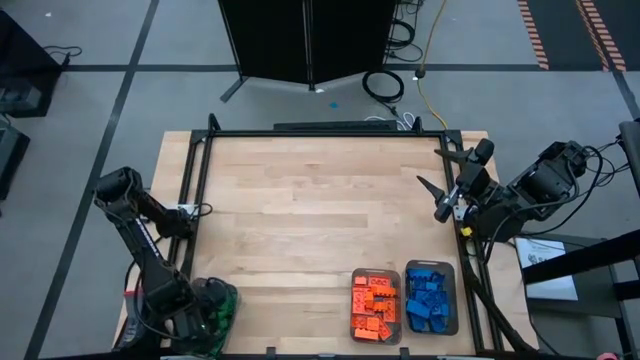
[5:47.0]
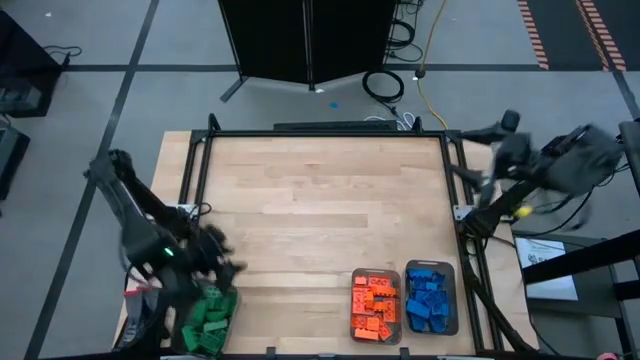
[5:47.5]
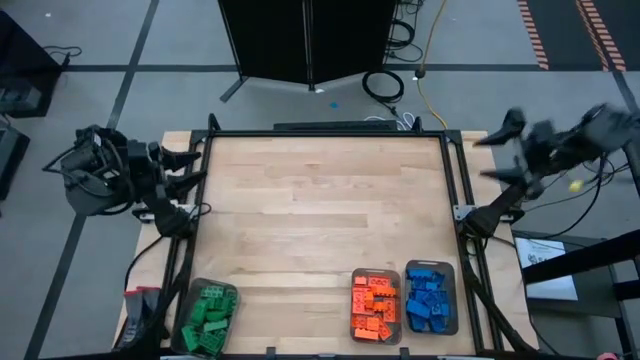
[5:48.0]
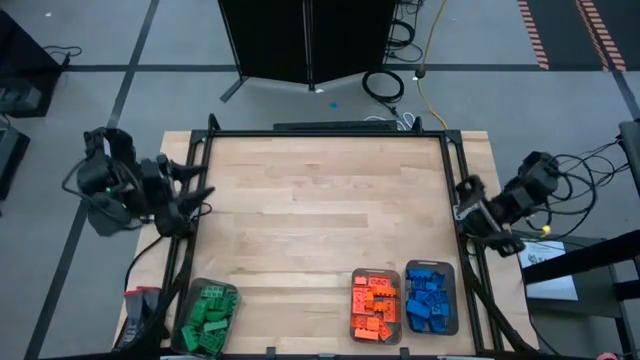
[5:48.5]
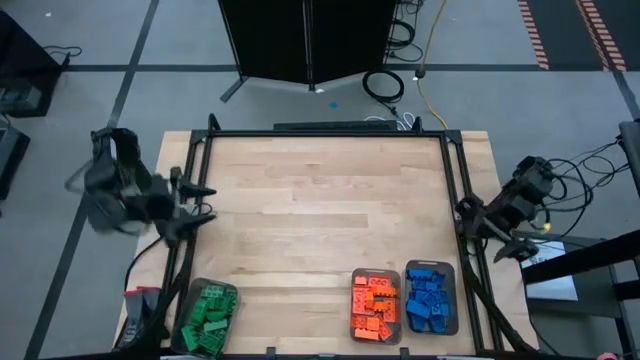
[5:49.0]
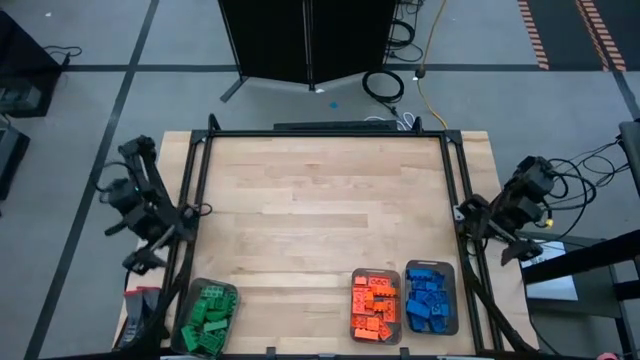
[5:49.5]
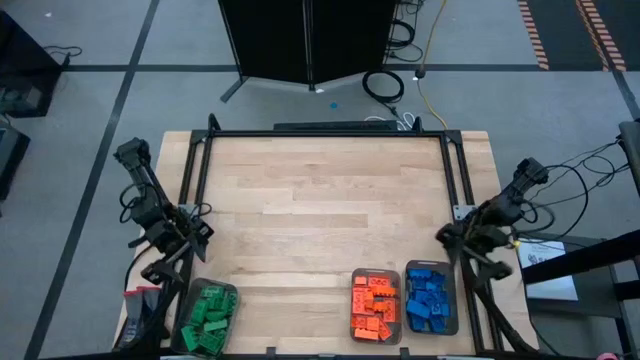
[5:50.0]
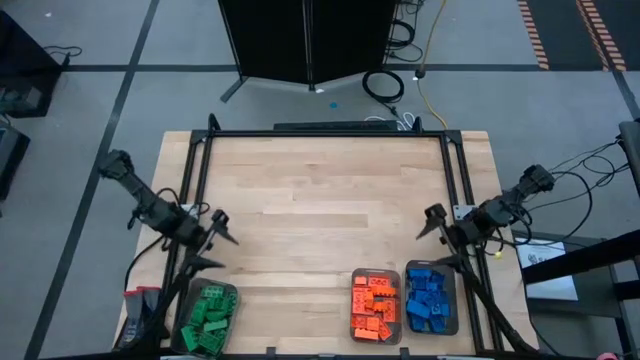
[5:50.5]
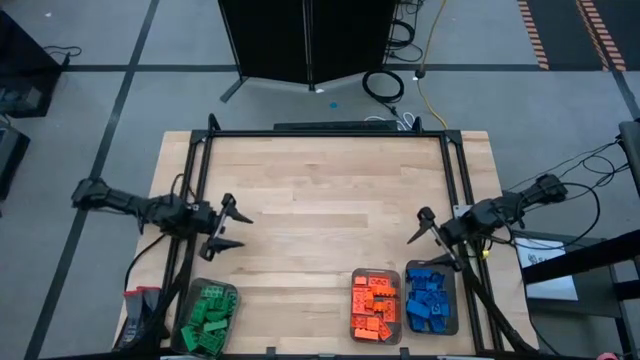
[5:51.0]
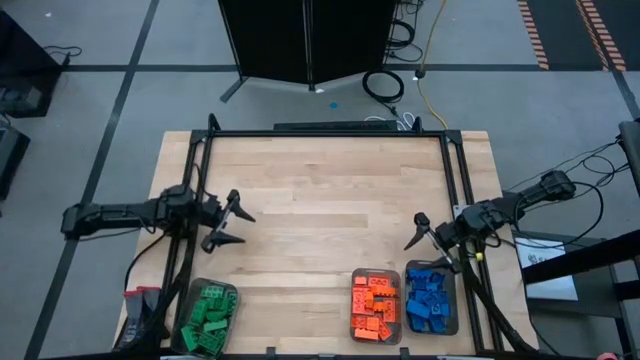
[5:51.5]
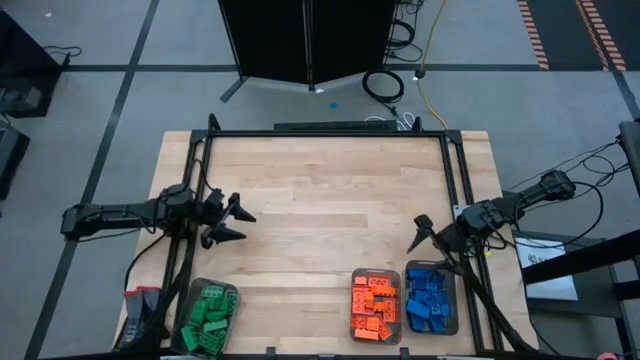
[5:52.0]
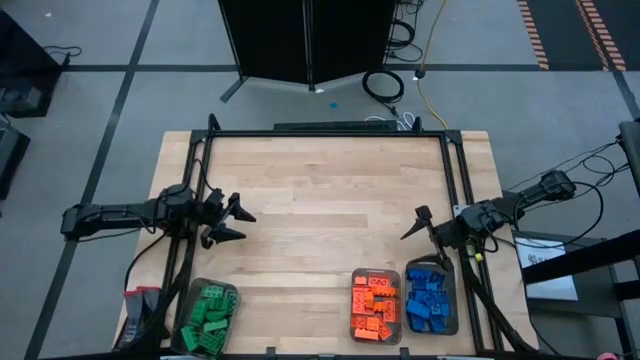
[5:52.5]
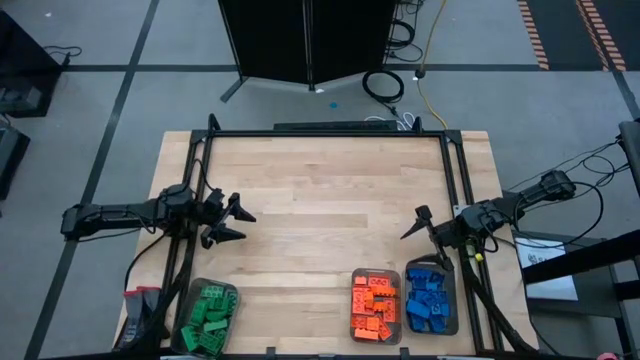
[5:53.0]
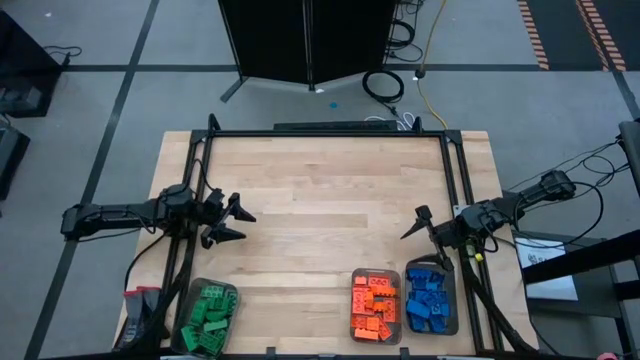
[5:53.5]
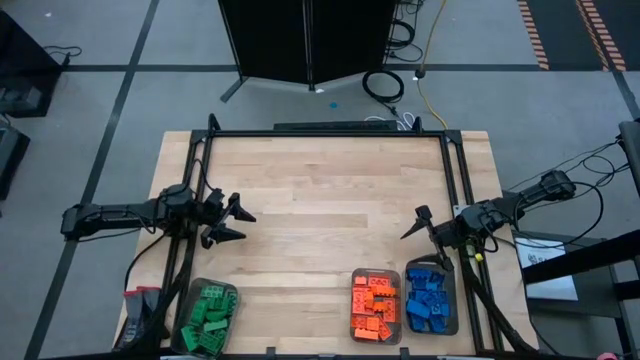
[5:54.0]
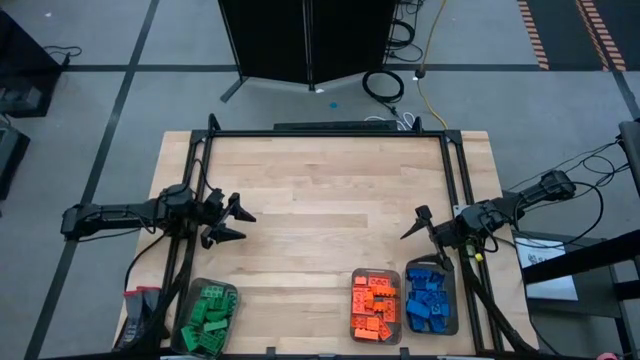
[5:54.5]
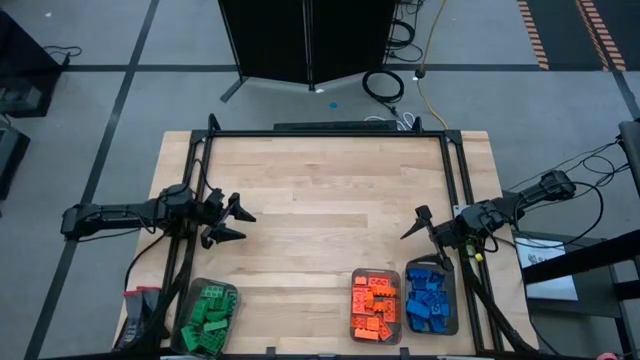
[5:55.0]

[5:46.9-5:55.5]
Task: Sort blocks
Return to Home Position

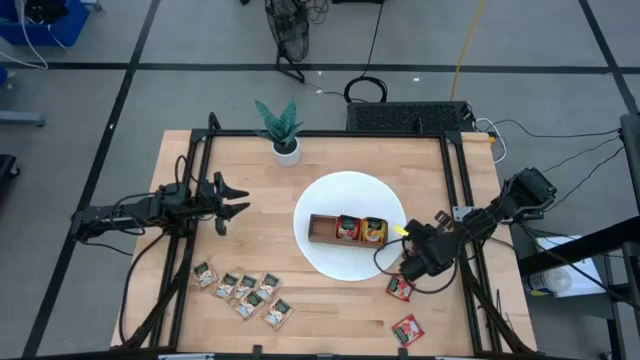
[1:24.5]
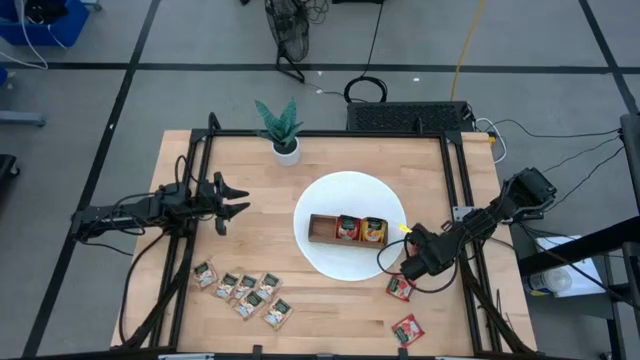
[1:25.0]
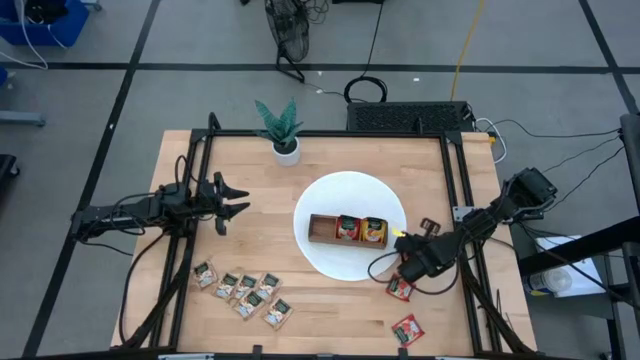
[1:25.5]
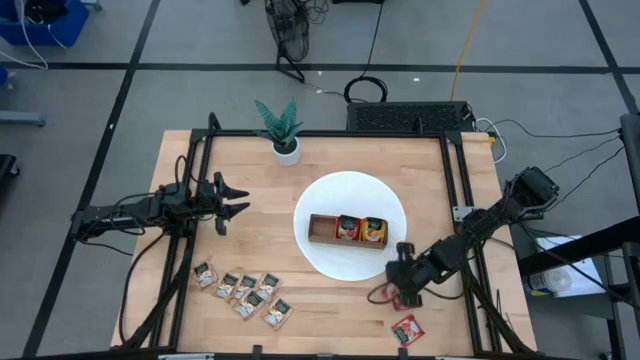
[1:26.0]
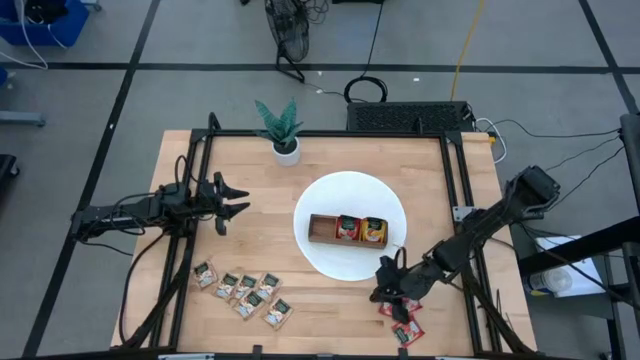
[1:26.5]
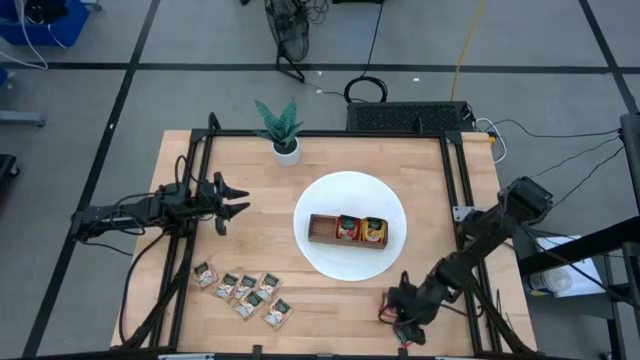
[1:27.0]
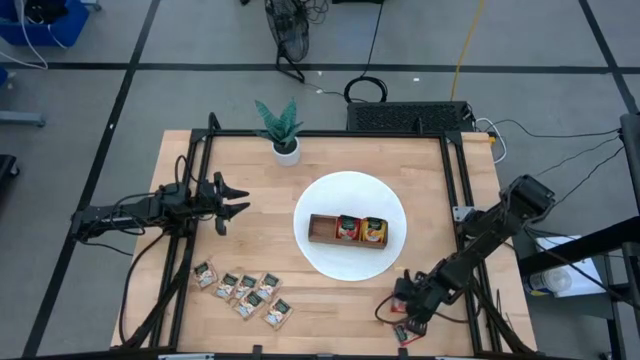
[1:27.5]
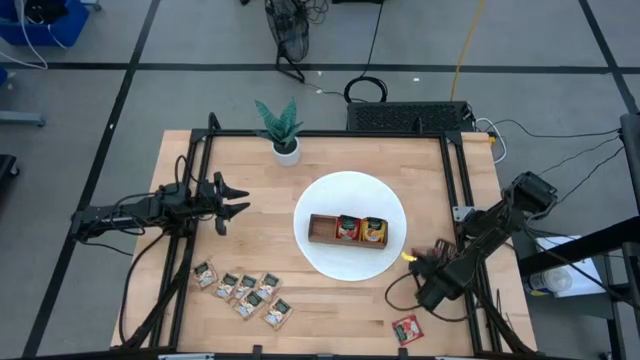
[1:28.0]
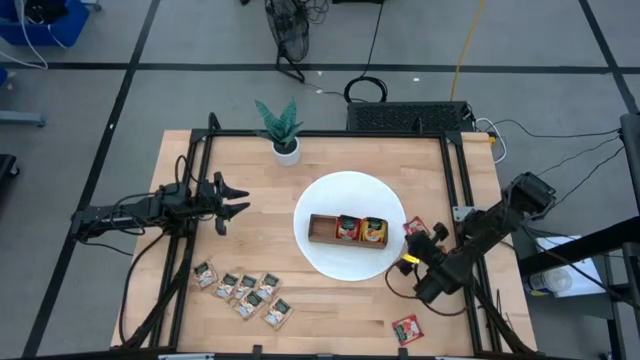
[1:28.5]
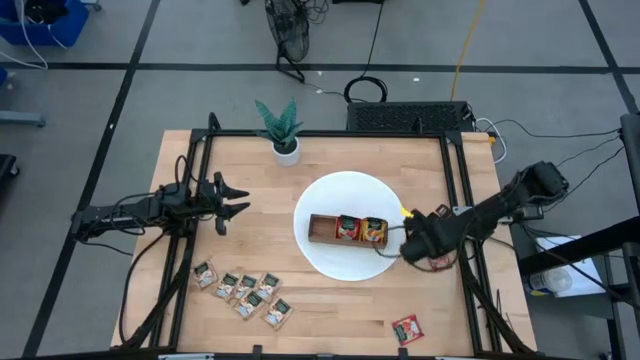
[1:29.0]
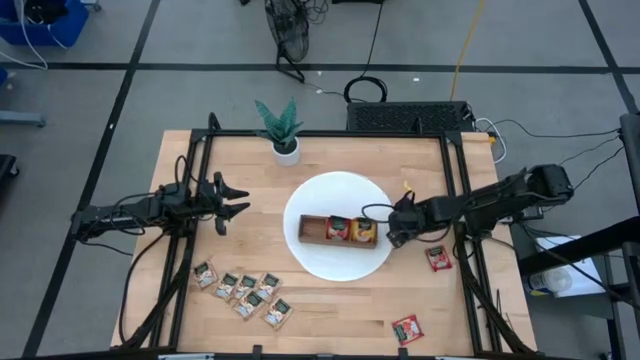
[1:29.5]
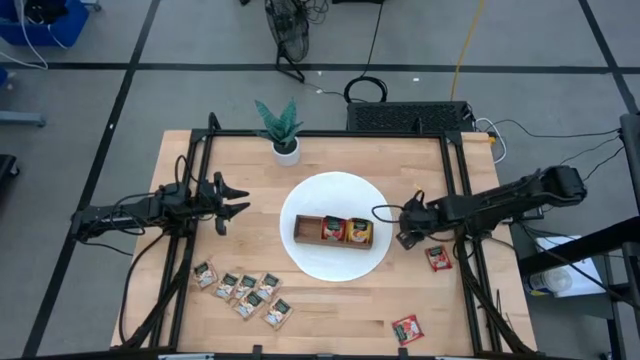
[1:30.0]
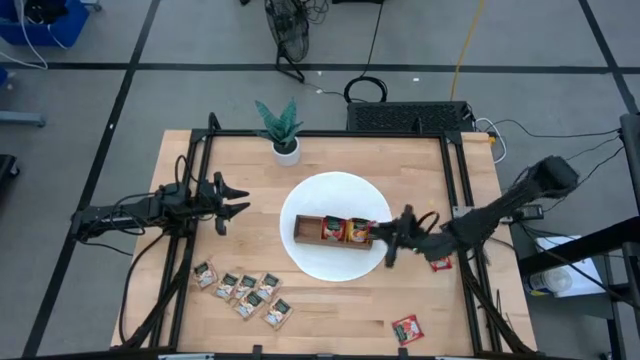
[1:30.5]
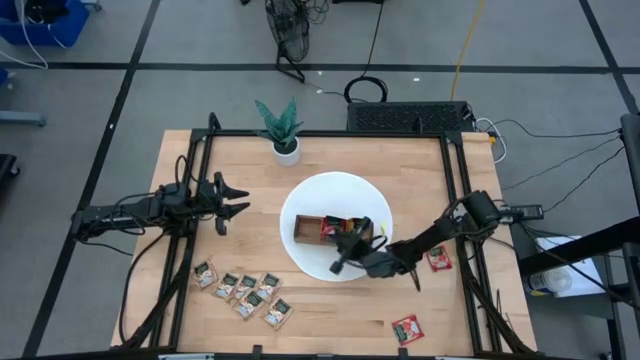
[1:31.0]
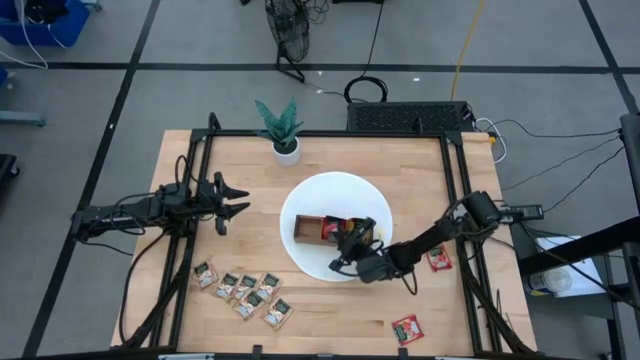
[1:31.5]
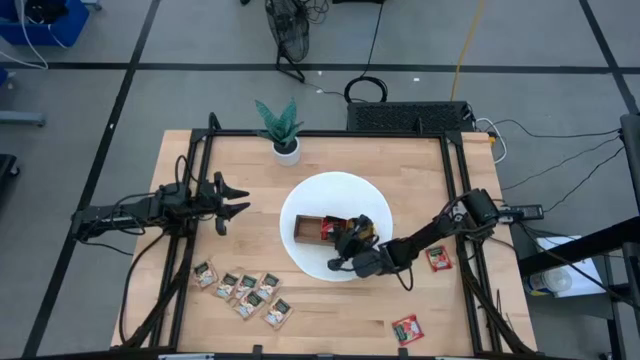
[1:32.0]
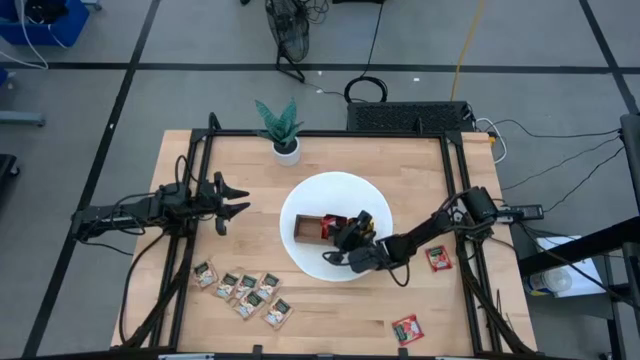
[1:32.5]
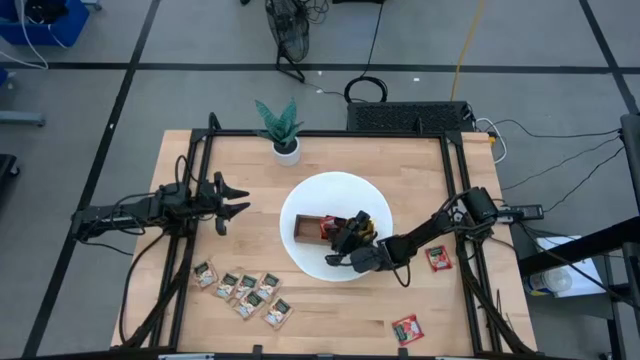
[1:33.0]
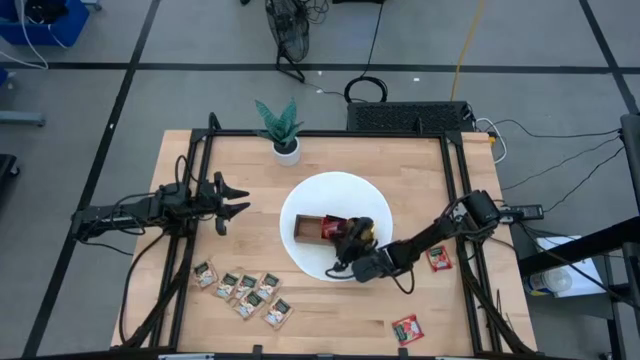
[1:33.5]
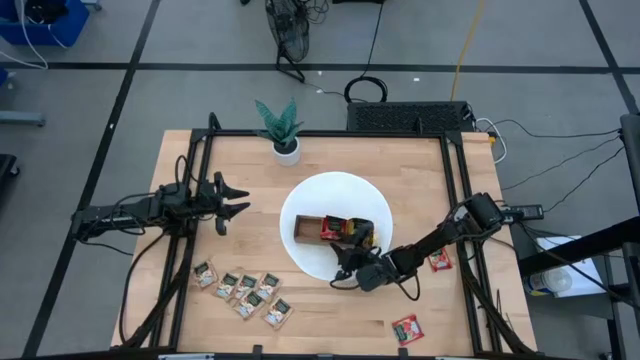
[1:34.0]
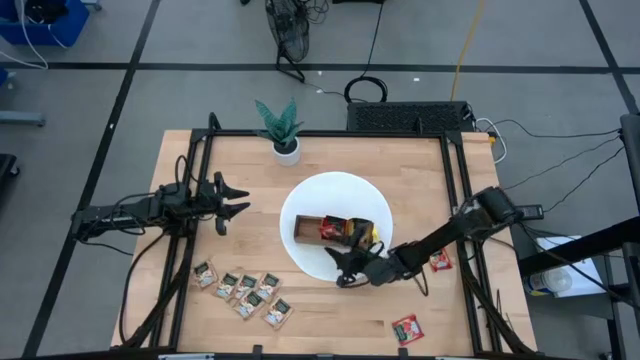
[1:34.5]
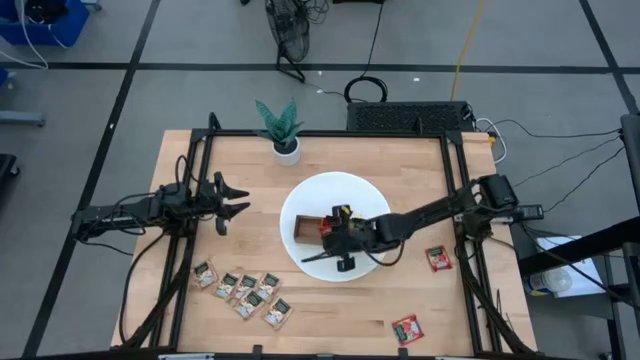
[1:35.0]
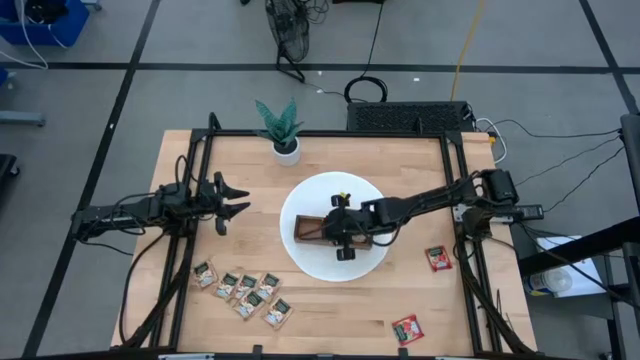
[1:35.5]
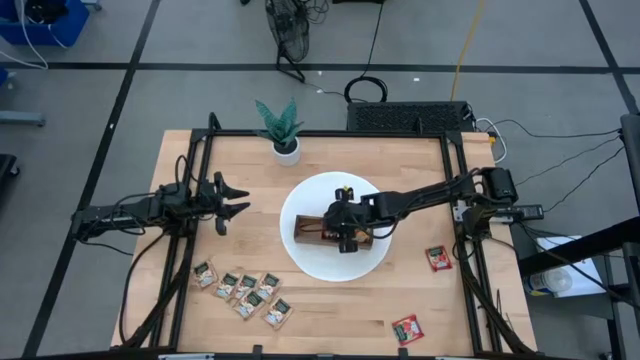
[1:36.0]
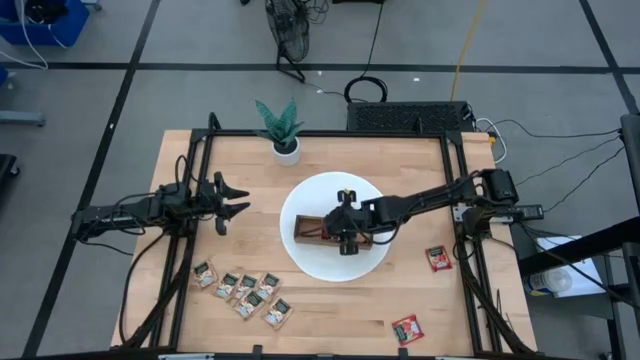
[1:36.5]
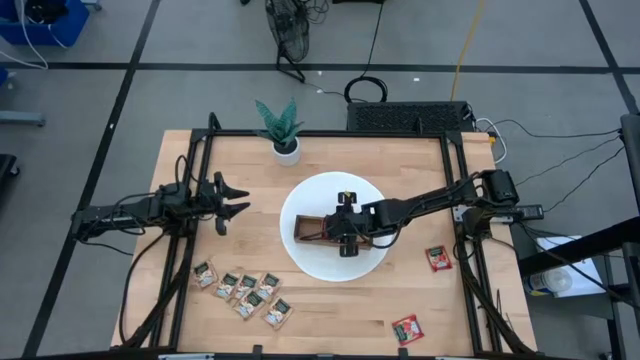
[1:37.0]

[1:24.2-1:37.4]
Task: Pick & Place Tea
Put the red tea bag into the middle section of the wooden organizer
